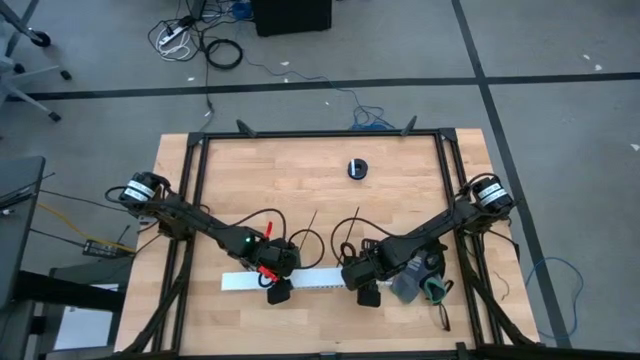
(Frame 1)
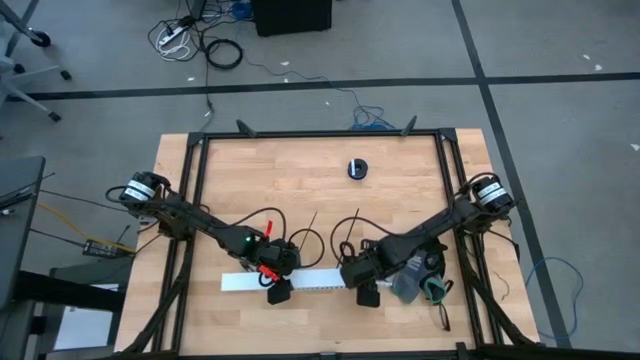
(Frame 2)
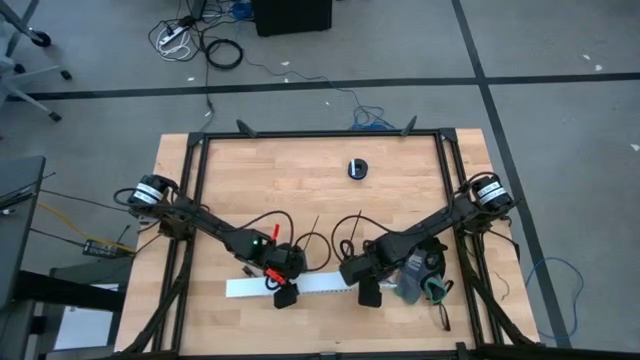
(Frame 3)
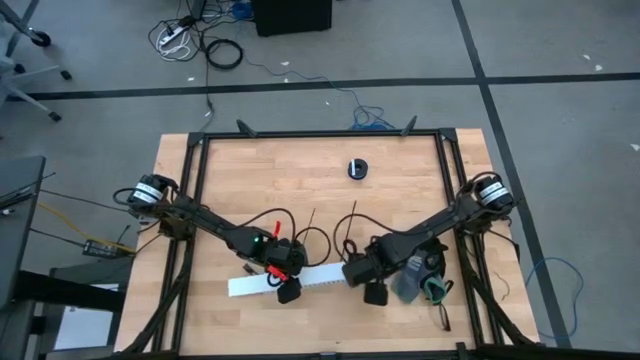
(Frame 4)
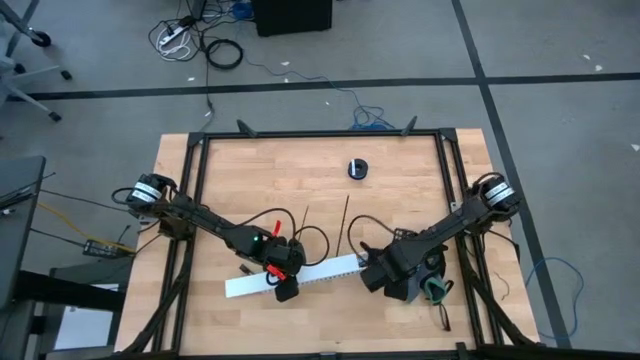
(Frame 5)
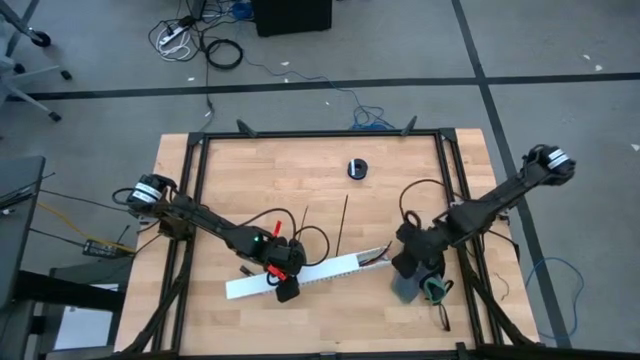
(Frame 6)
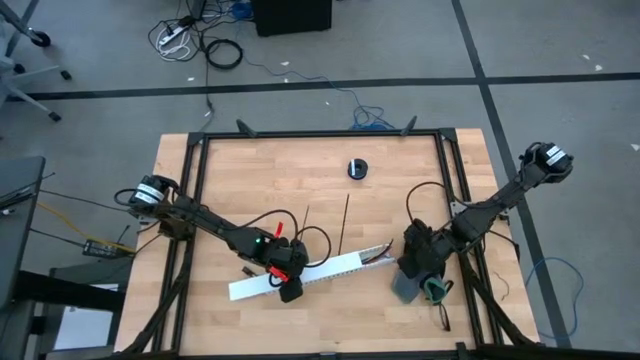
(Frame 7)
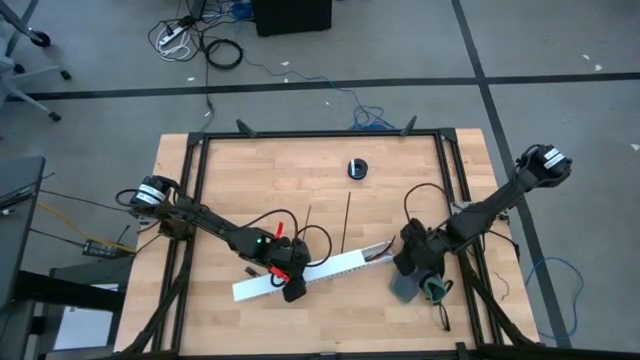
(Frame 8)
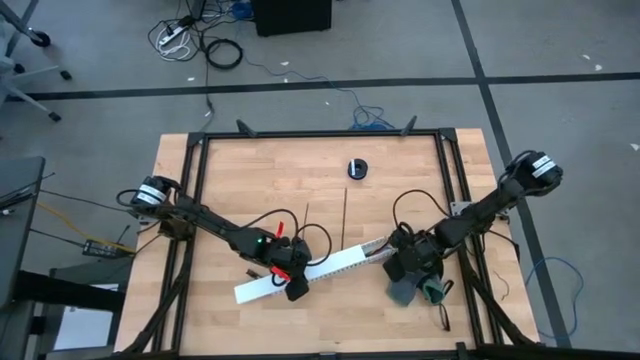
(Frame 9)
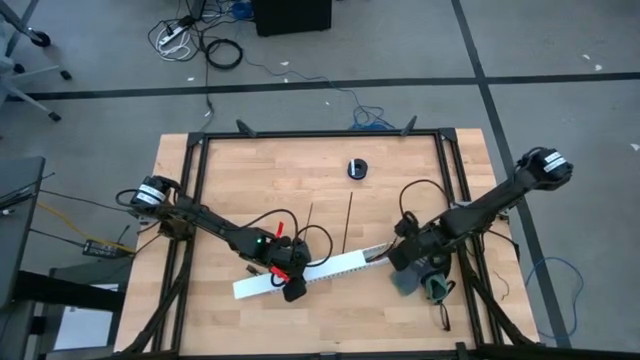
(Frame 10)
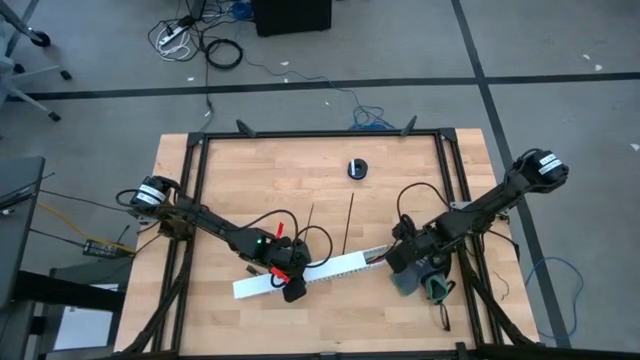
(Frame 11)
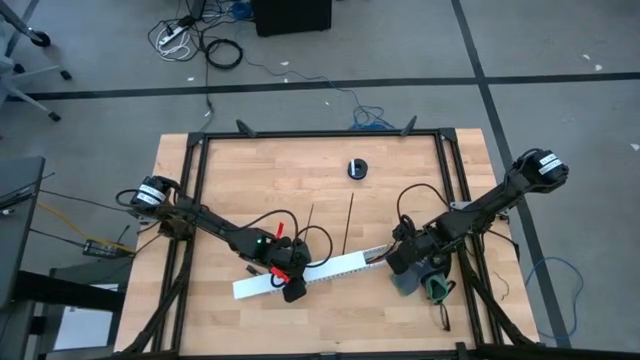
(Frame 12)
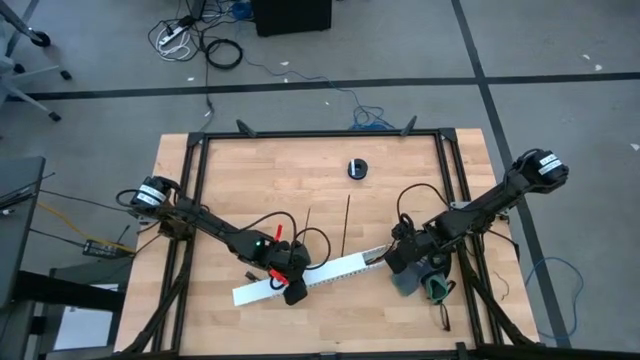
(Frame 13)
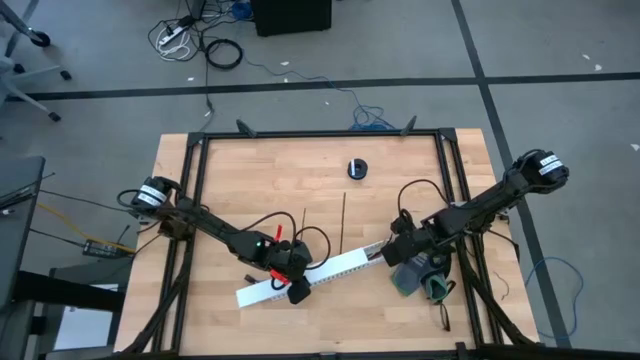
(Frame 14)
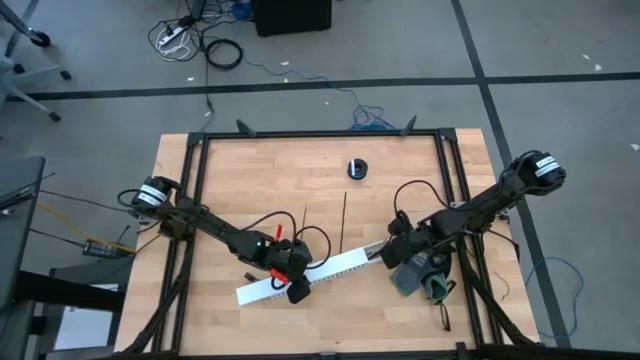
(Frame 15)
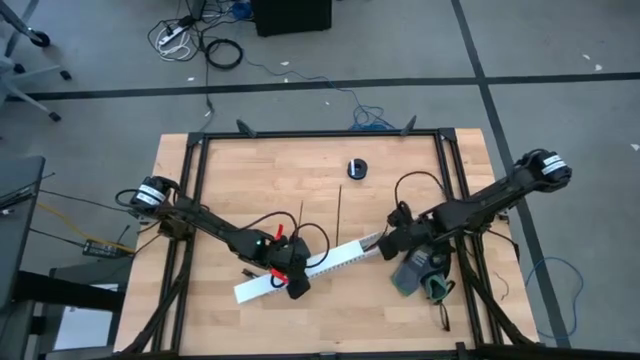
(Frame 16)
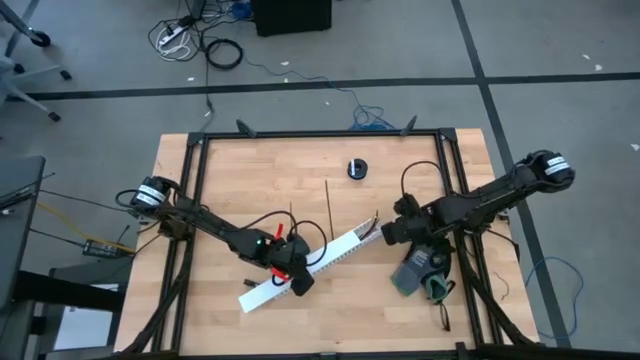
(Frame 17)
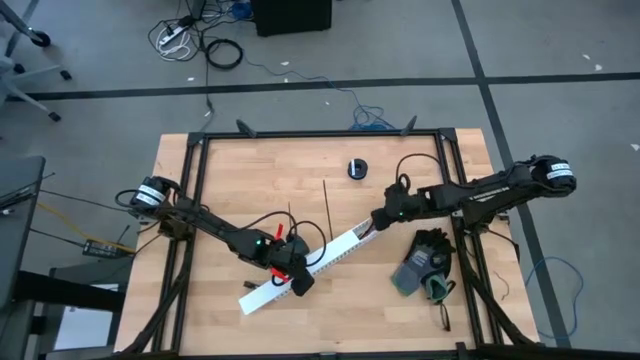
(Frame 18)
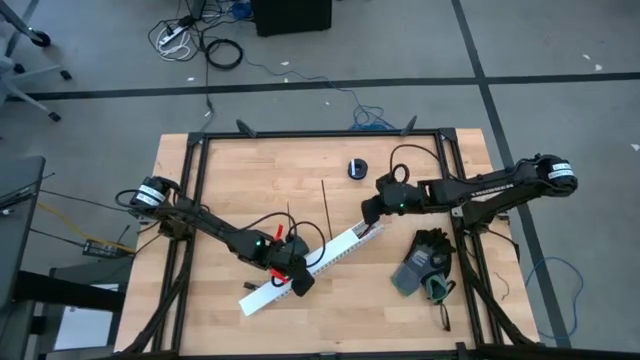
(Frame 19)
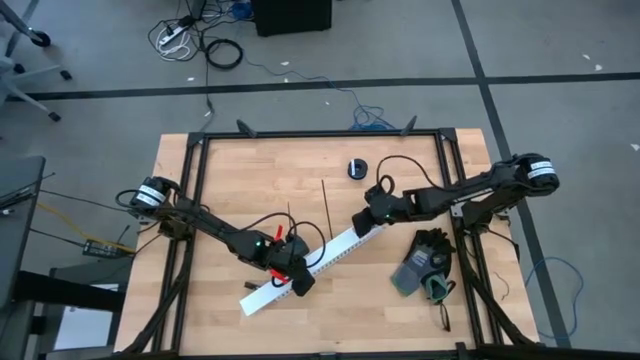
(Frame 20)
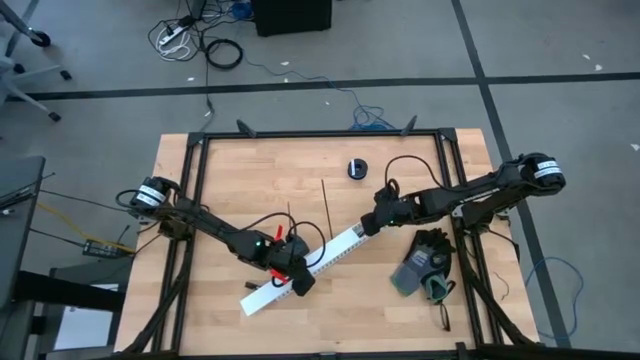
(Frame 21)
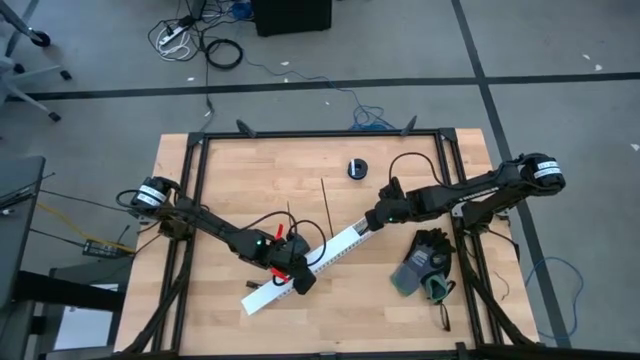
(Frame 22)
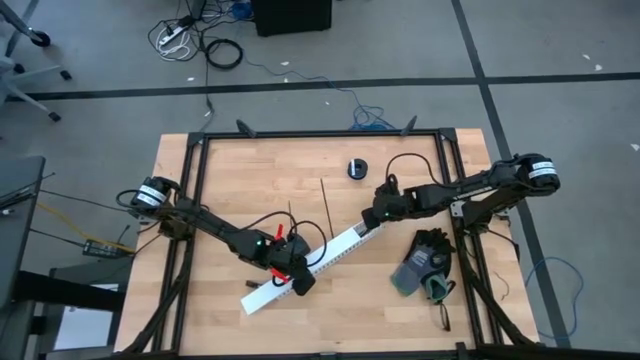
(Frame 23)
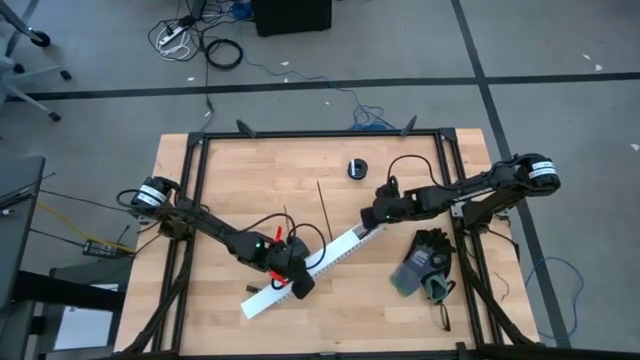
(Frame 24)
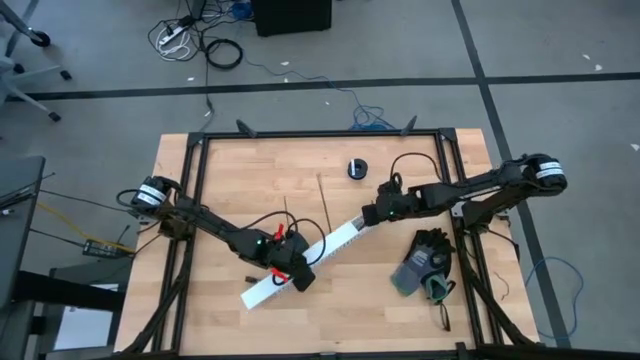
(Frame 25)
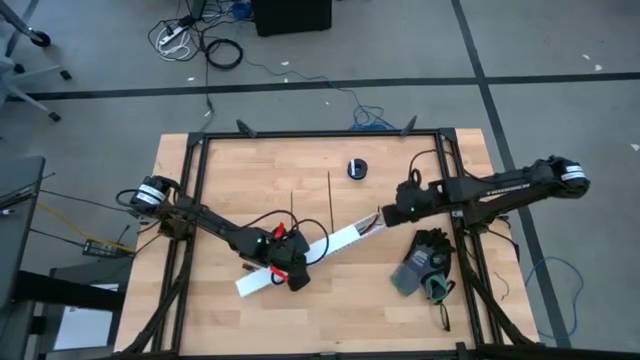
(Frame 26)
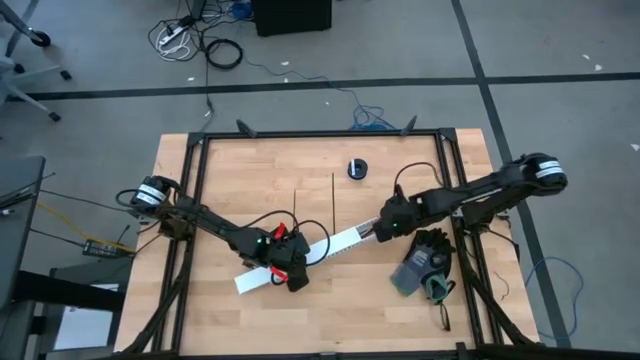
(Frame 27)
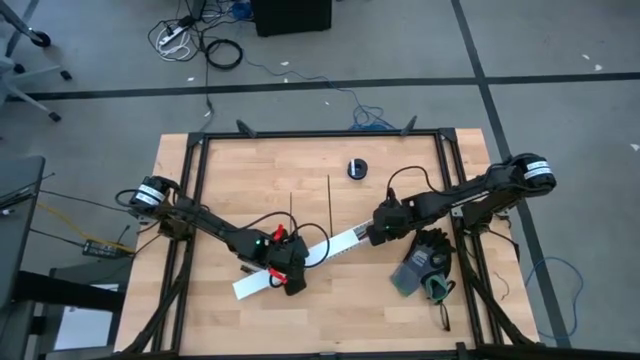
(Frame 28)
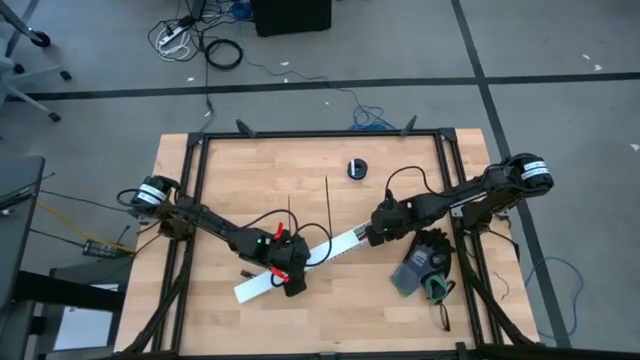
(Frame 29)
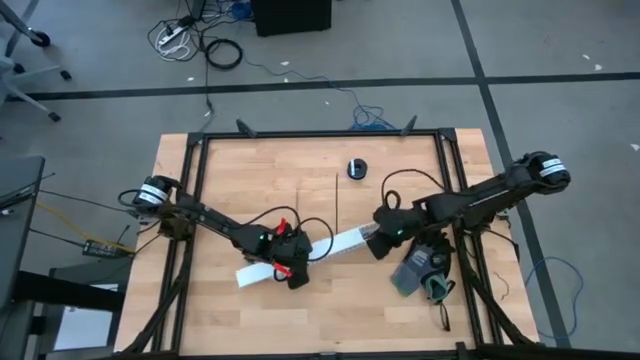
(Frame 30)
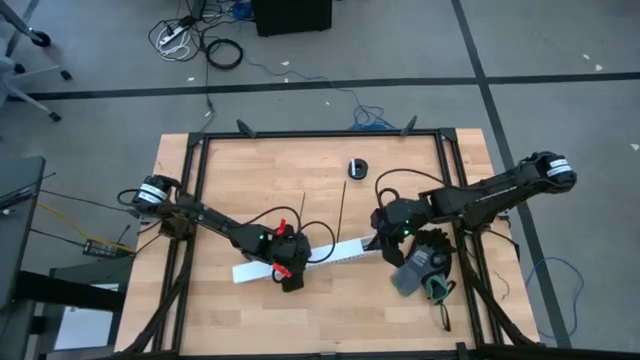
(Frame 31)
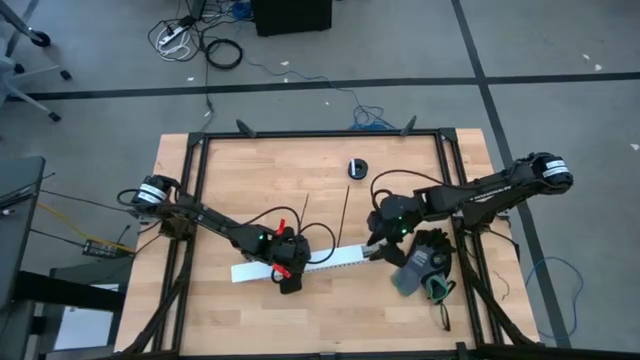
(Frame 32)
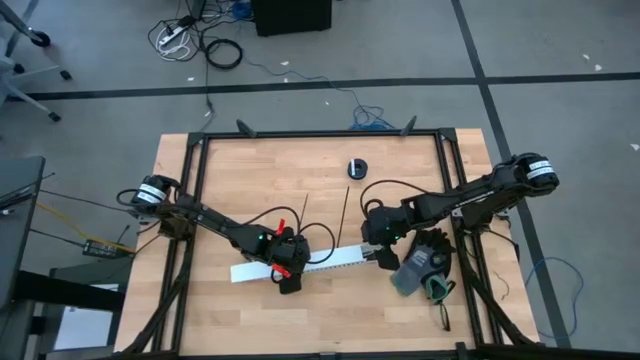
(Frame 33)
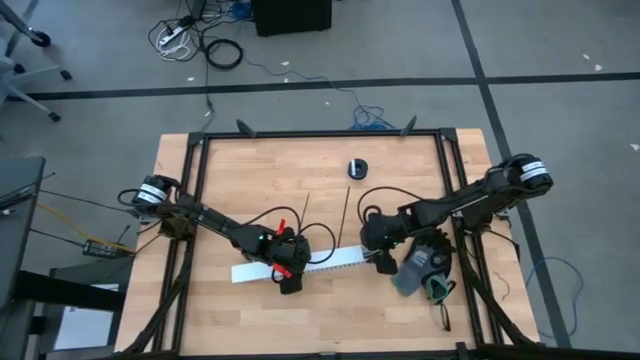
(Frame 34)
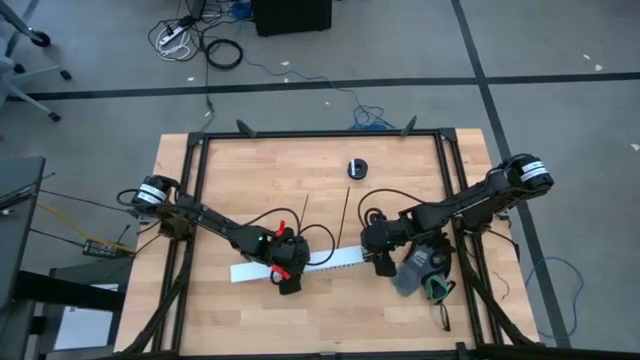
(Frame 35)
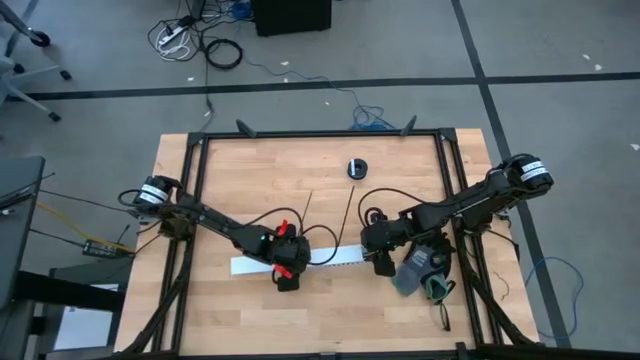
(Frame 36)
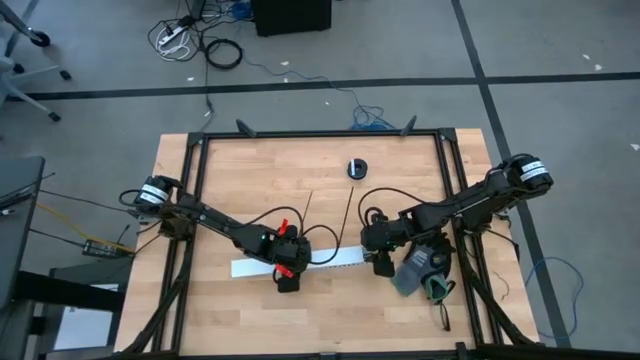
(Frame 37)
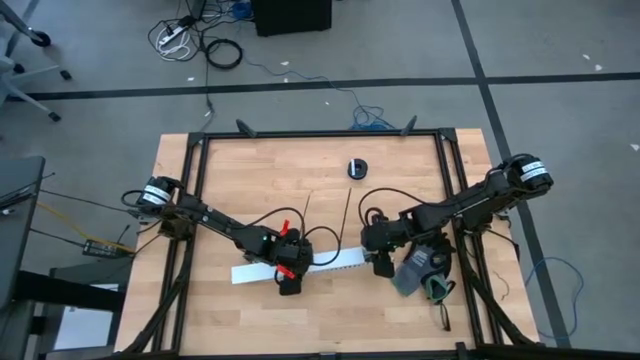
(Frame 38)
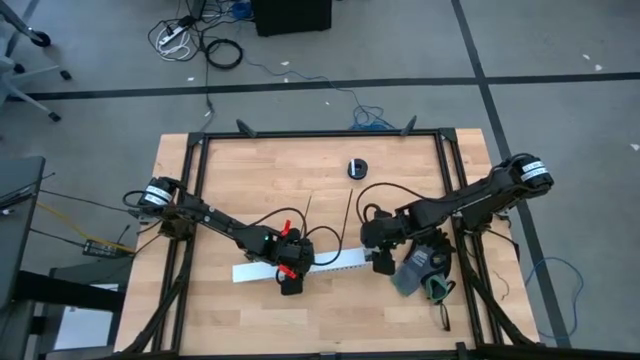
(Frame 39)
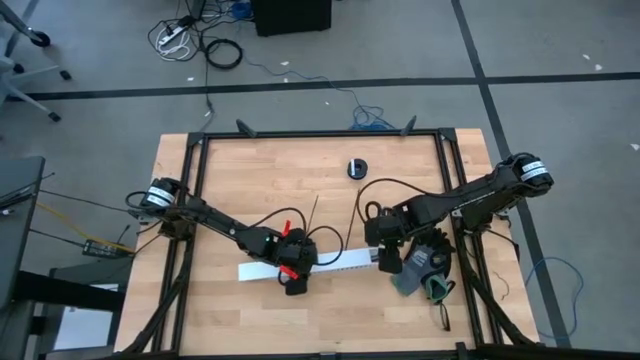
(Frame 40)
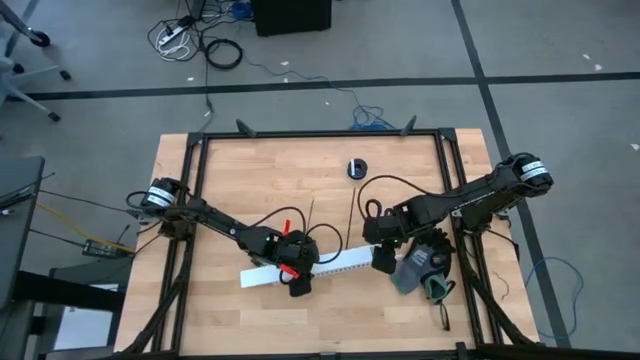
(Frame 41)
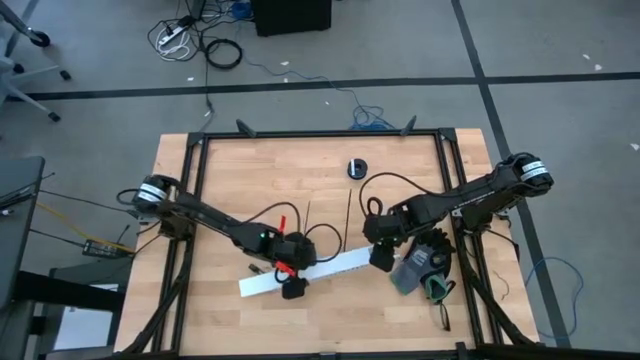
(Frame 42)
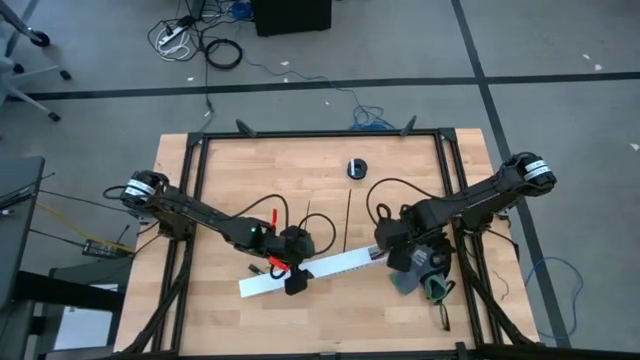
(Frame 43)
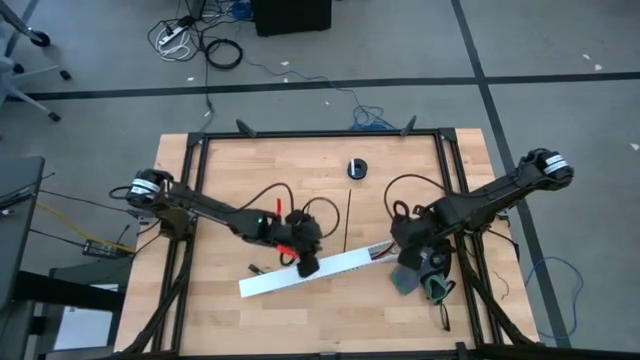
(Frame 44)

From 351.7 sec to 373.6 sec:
Task: Ziptie cables
Close the white cable duct
